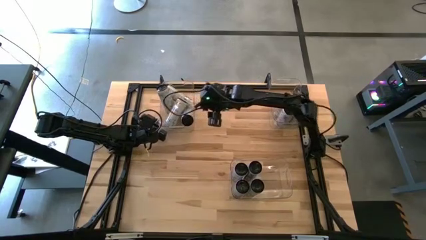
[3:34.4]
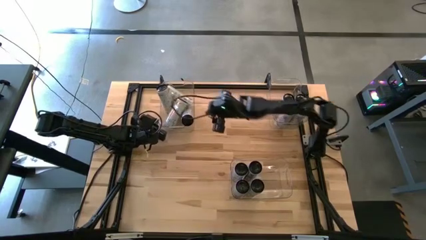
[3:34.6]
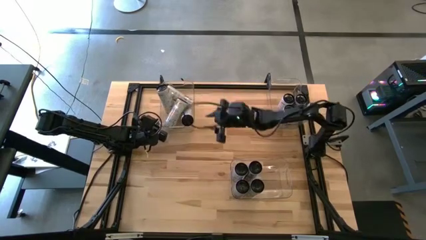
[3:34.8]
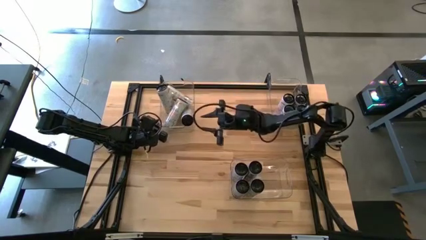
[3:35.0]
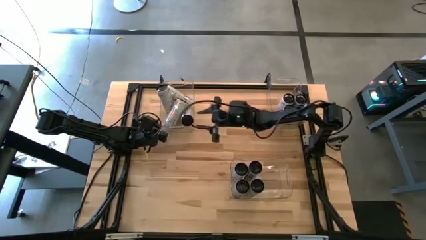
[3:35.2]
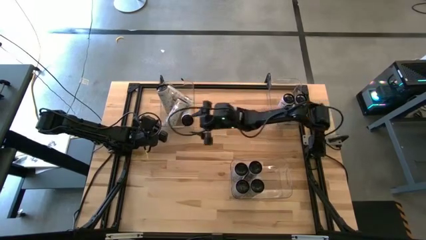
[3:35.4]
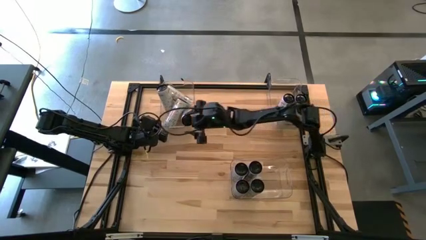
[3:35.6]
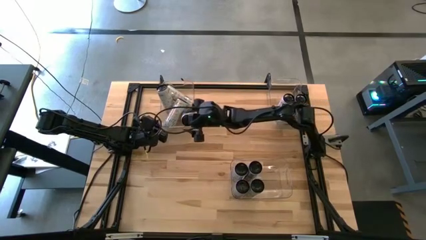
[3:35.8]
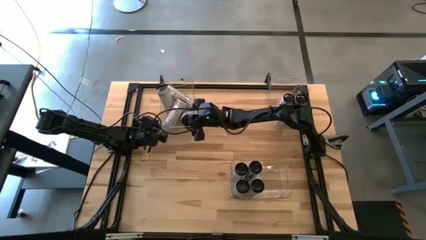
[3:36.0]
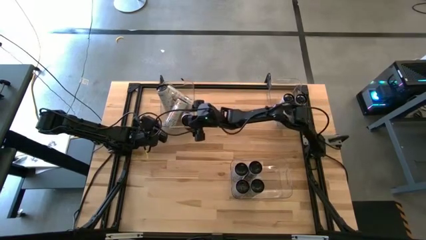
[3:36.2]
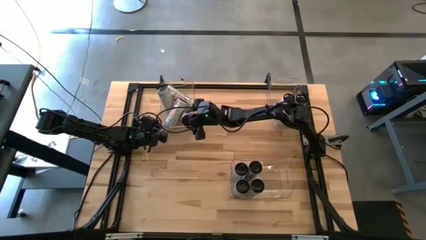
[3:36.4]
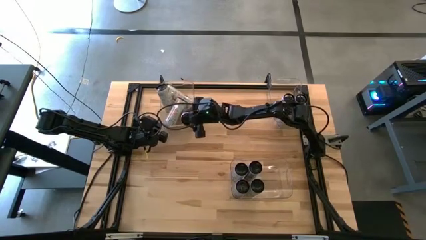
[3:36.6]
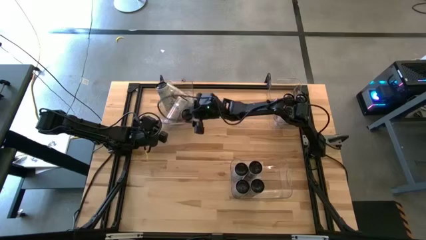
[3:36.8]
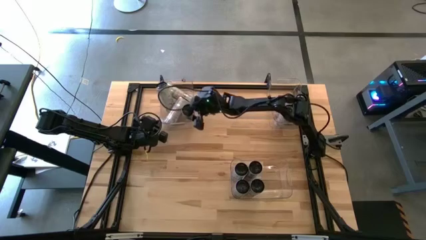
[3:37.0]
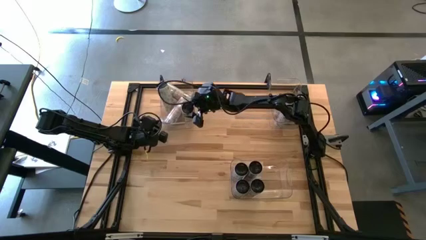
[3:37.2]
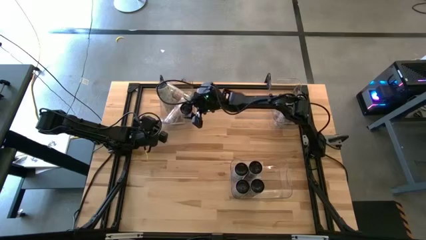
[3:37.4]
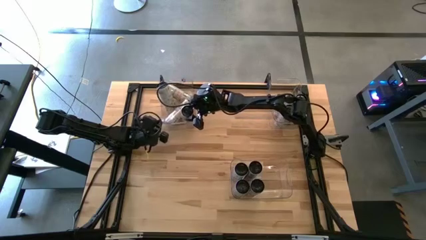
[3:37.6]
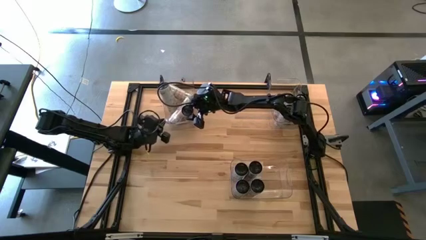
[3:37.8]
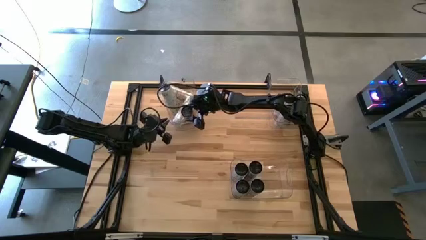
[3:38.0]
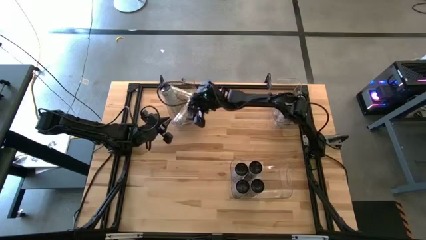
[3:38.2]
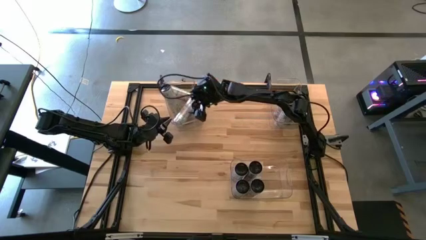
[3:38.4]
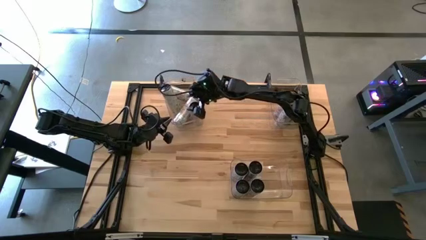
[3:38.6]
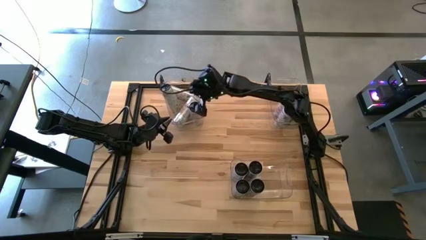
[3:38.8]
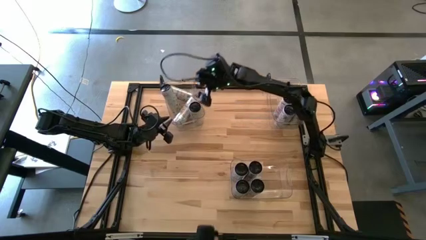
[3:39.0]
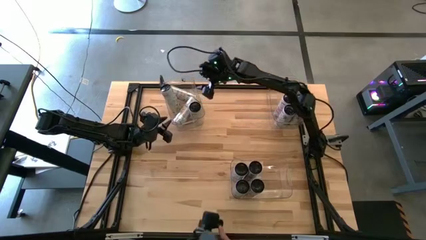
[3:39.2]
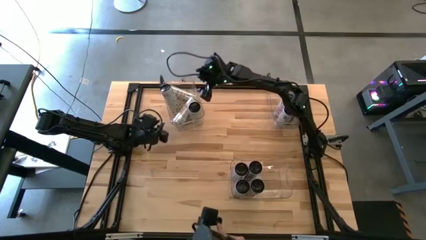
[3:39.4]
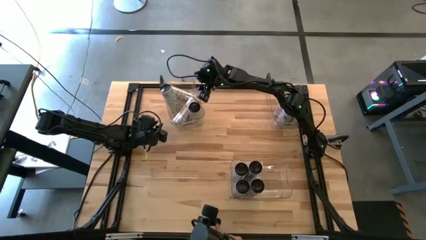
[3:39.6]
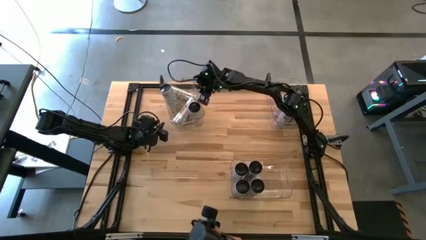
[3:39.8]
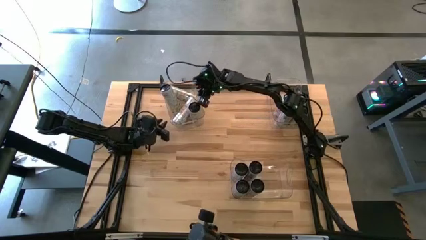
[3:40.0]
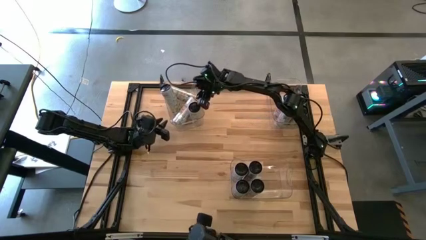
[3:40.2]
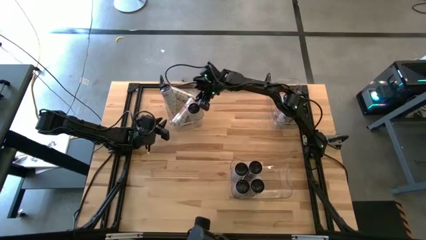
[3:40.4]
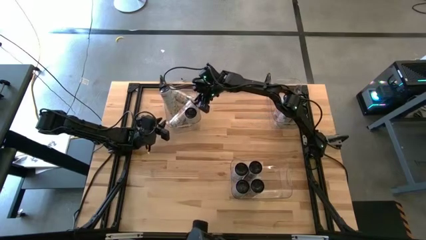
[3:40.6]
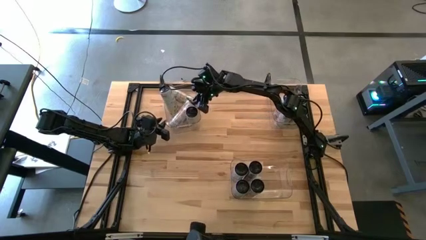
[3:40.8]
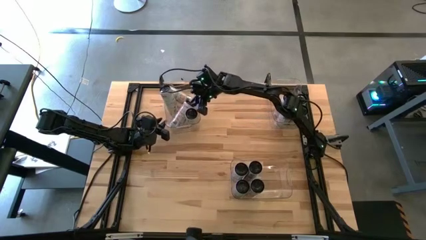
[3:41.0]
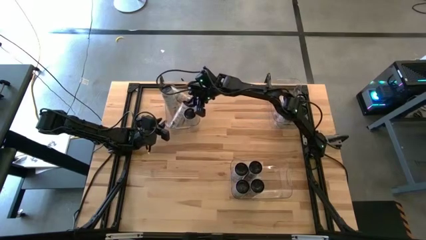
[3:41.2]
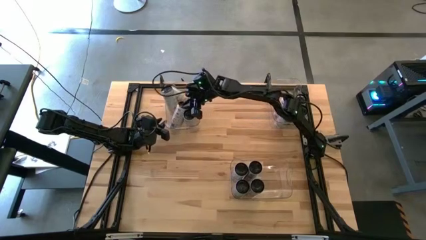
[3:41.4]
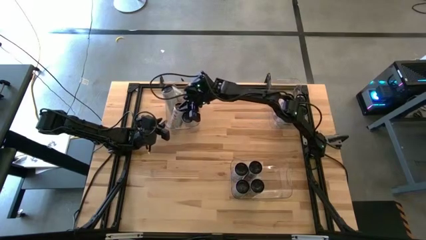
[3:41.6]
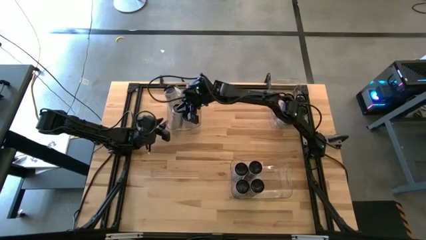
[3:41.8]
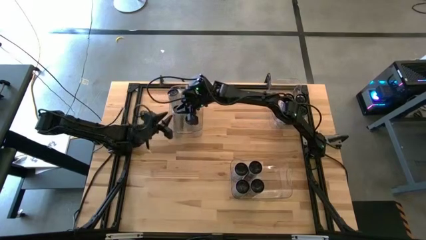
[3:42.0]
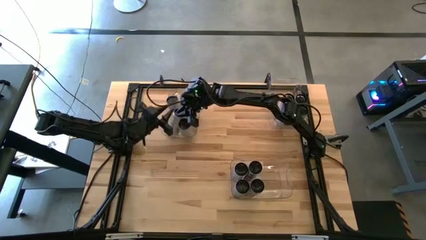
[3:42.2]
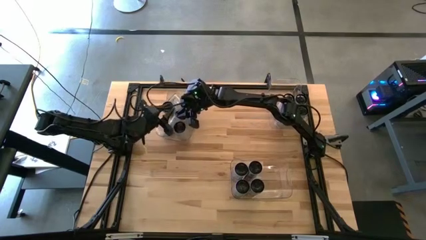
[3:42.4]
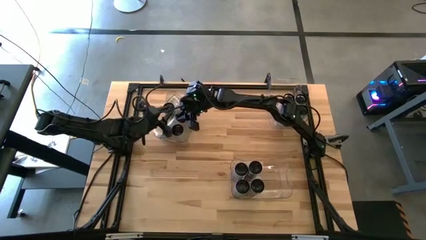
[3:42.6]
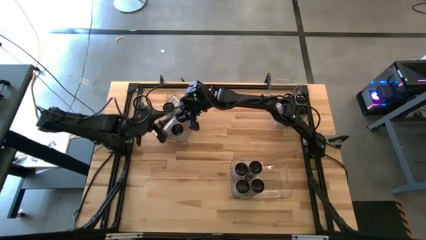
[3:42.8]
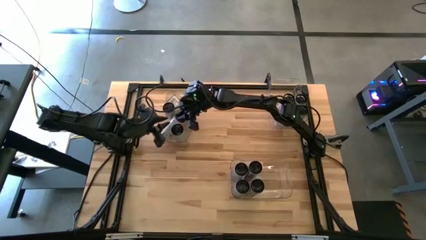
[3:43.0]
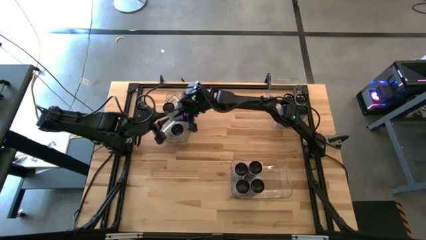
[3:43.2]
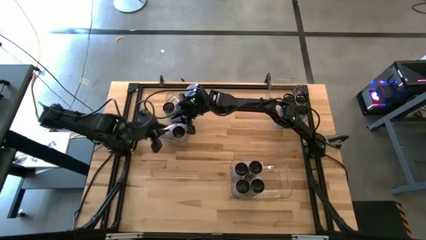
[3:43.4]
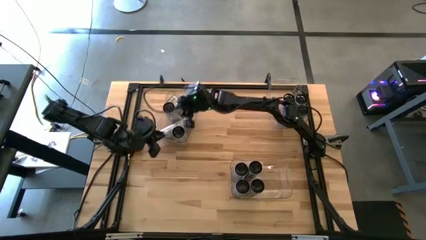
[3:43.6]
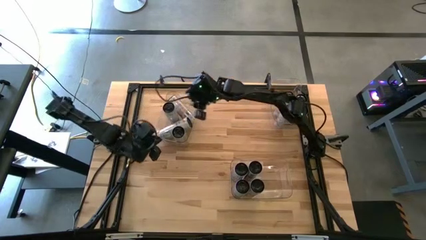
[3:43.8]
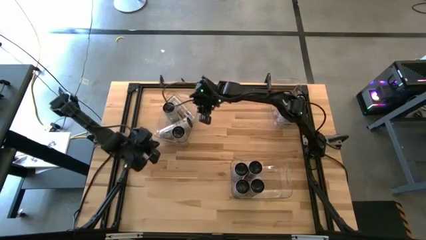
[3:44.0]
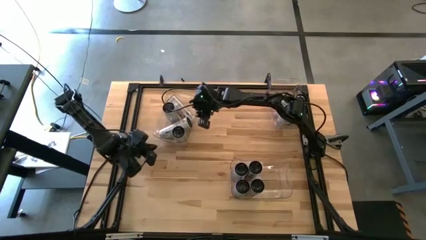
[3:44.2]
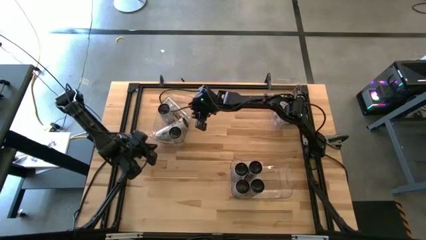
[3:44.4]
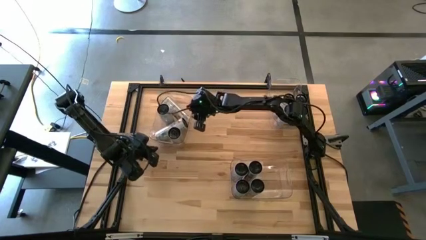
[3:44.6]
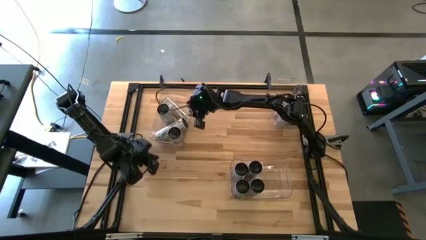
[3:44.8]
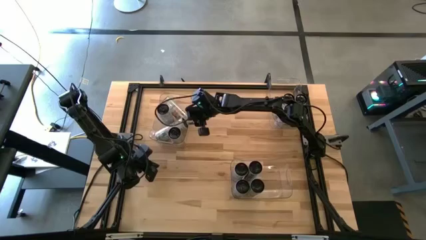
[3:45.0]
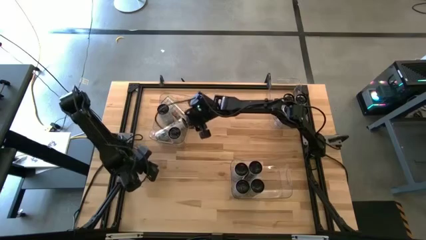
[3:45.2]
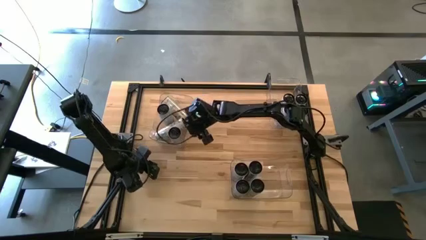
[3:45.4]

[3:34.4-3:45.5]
Task: Sort soda cans
Adjust the white/yellow soda cans

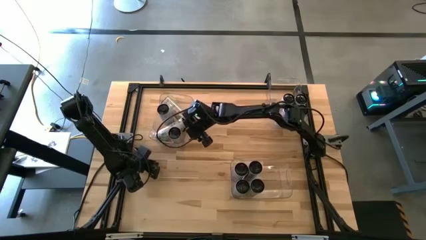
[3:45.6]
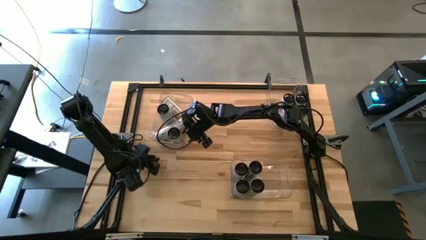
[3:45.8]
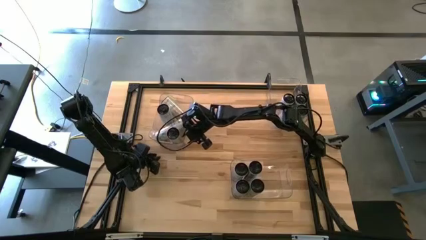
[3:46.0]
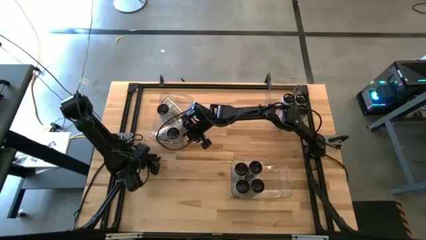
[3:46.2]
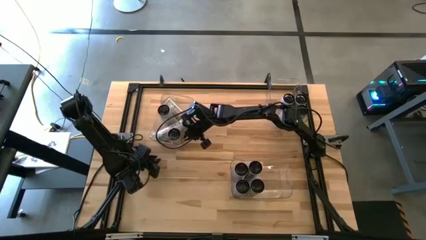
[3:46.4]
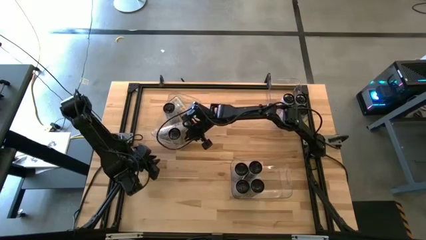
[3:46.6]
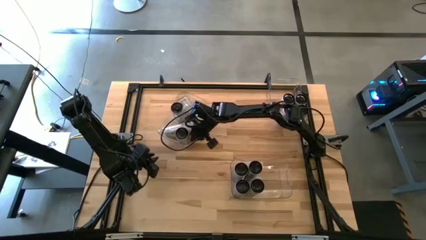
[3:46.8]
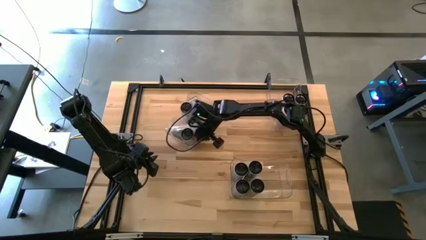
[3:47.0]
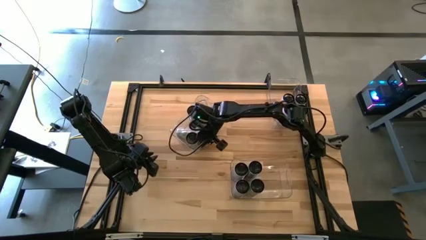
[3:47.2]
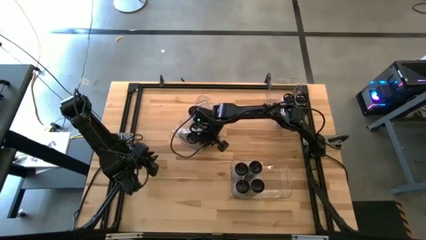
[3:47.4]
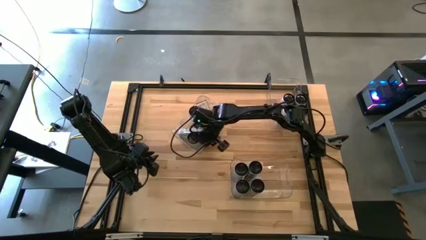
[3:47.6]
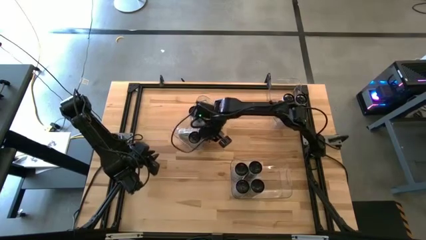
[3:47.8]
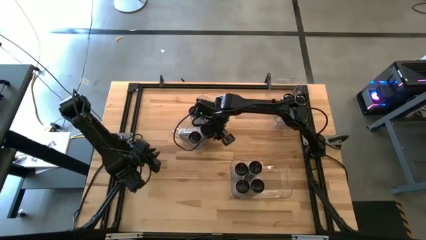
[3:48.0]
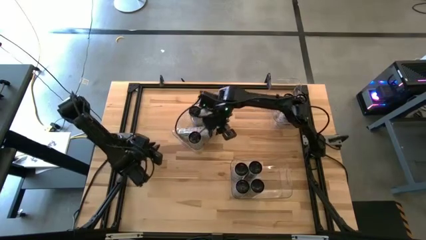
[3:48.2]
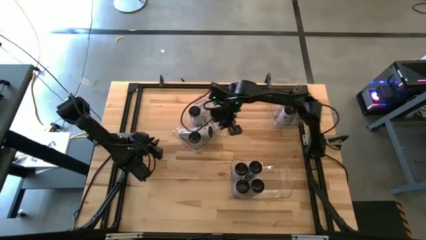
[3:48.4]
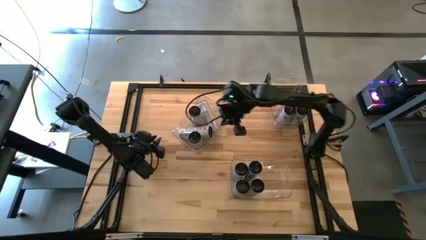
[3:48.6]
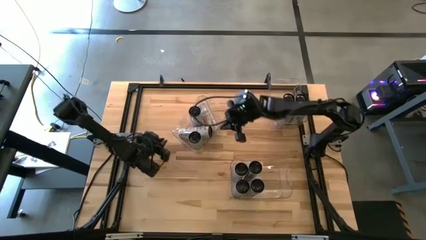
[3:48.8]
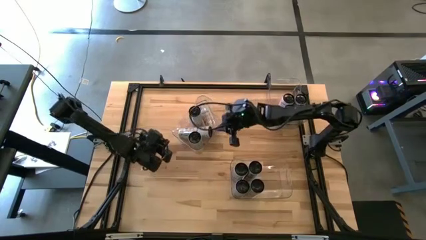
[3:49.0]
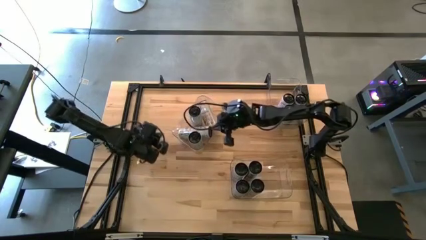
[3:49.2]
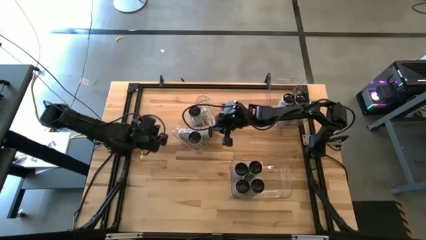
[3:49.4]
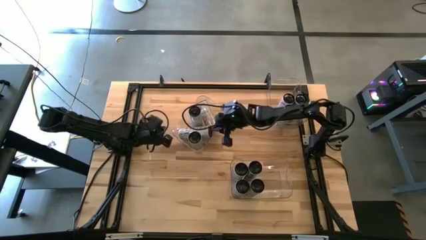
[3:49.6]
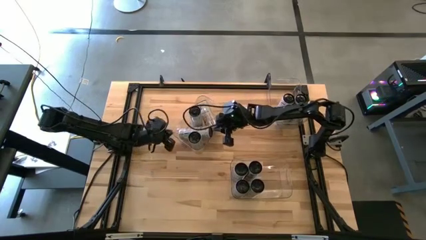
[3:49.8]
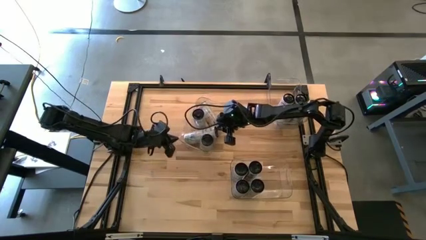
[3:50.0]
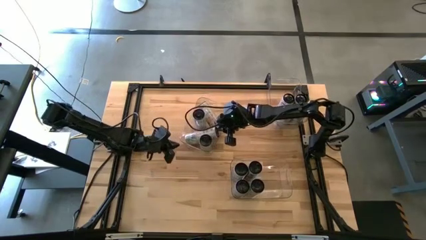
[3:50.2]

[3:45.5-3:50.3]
Move the transparent bin to the top center of the table
